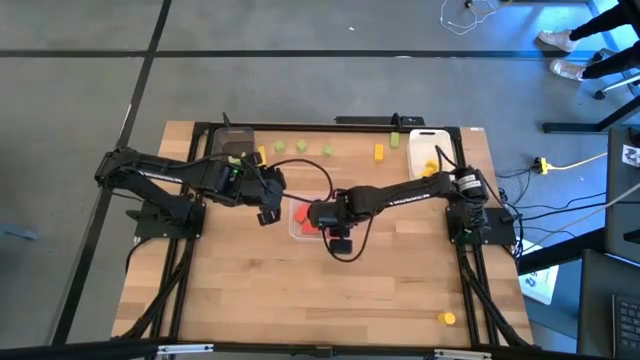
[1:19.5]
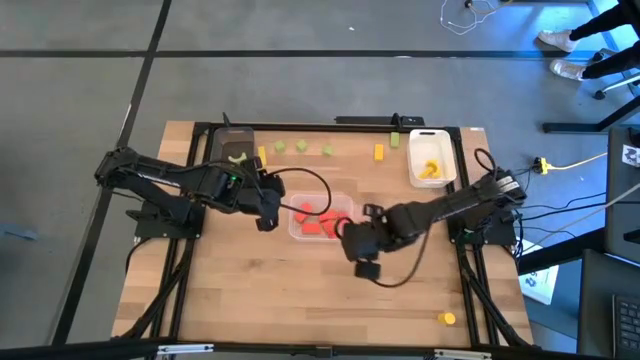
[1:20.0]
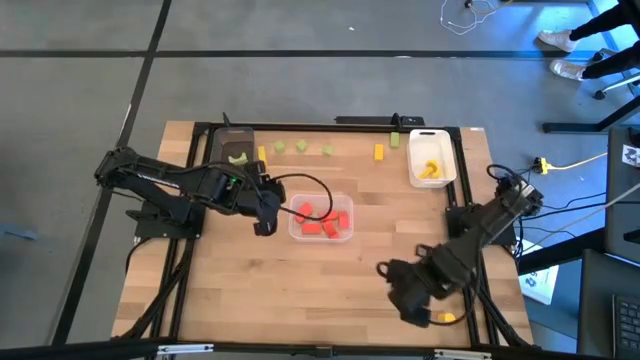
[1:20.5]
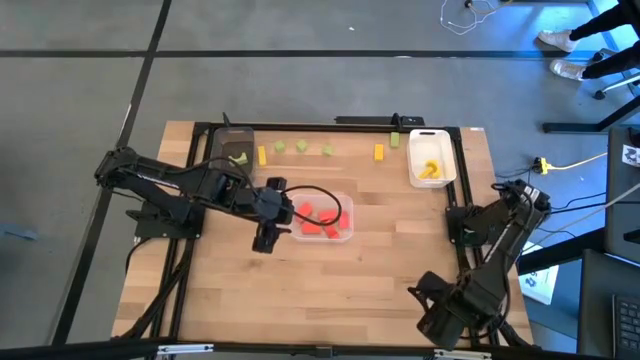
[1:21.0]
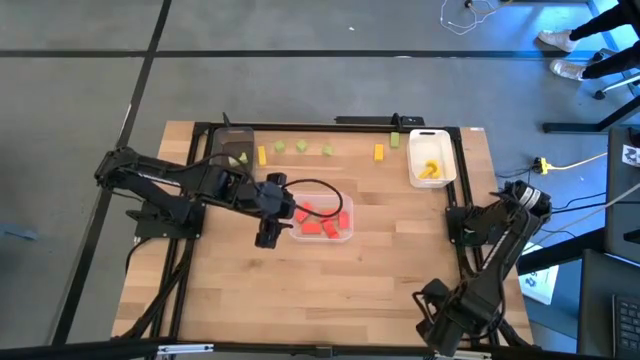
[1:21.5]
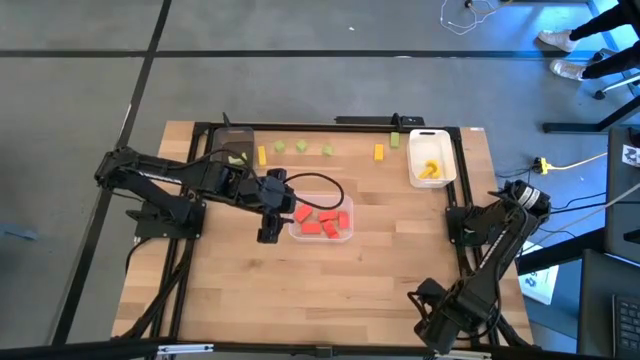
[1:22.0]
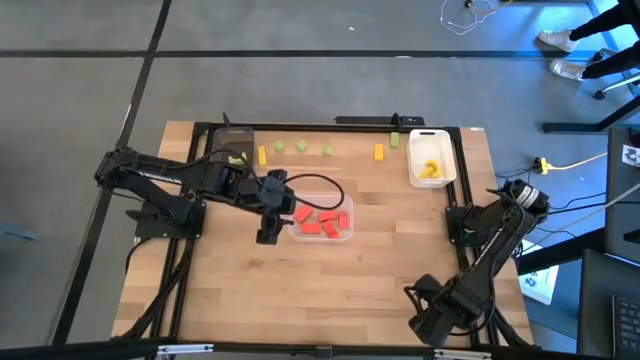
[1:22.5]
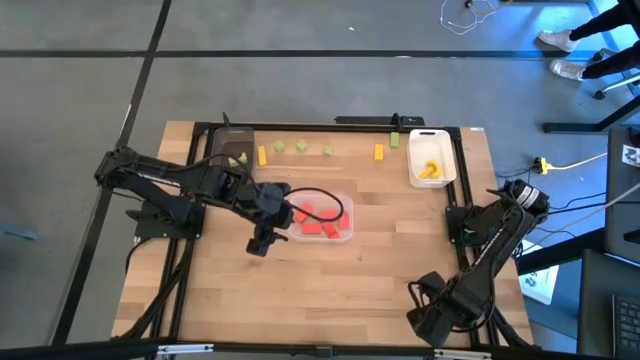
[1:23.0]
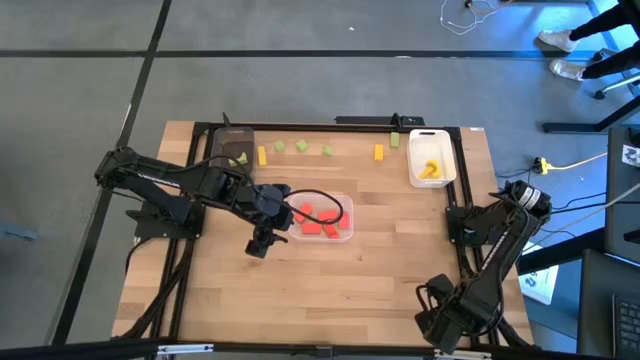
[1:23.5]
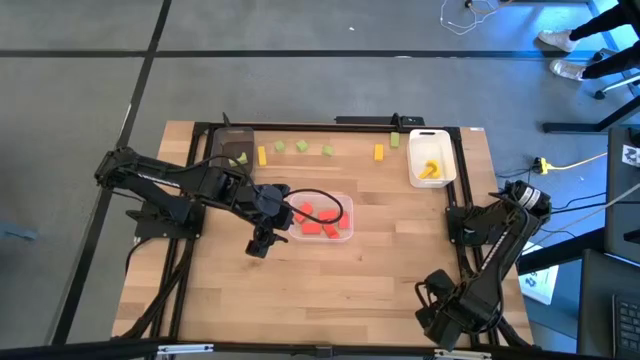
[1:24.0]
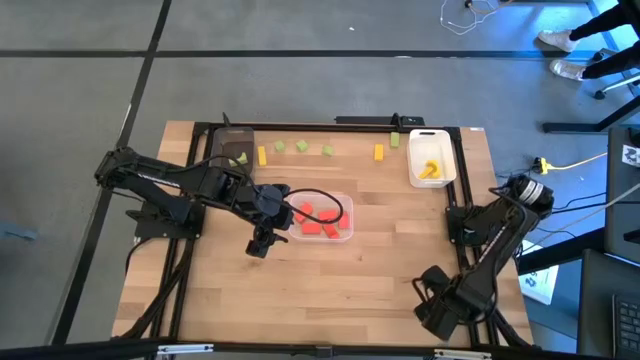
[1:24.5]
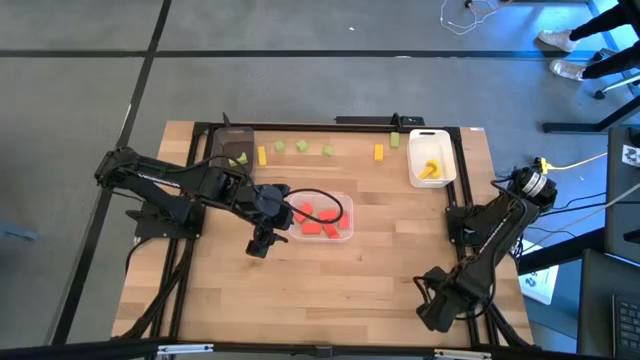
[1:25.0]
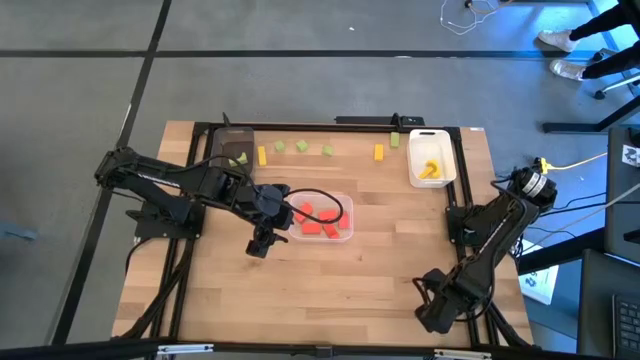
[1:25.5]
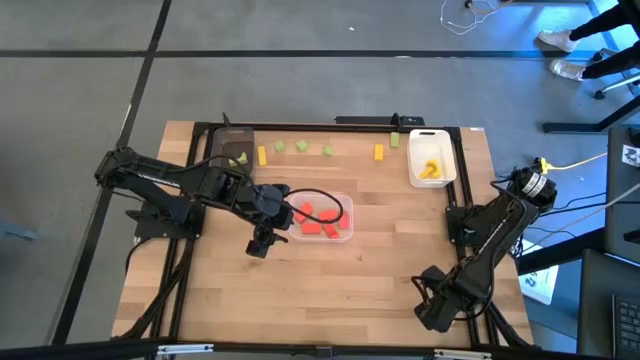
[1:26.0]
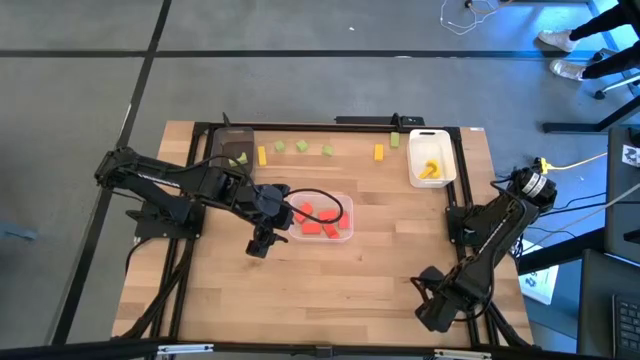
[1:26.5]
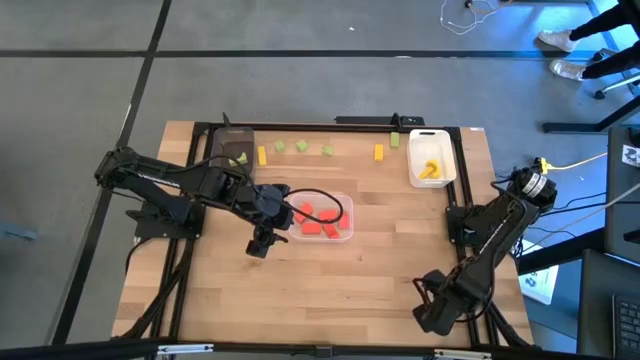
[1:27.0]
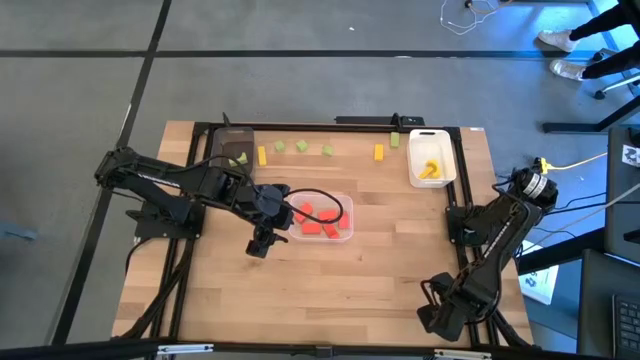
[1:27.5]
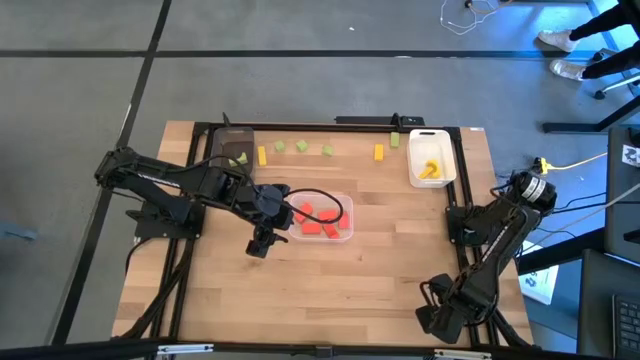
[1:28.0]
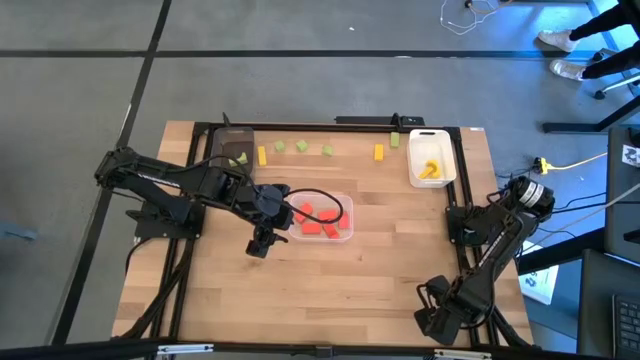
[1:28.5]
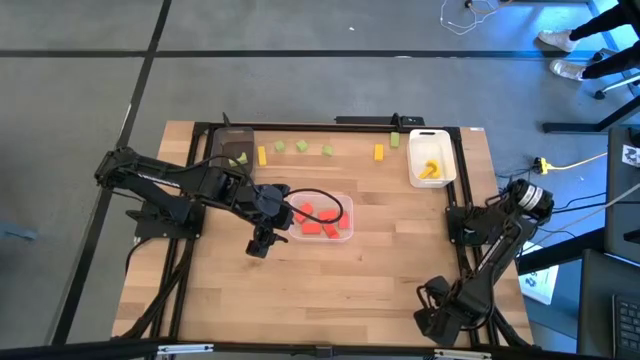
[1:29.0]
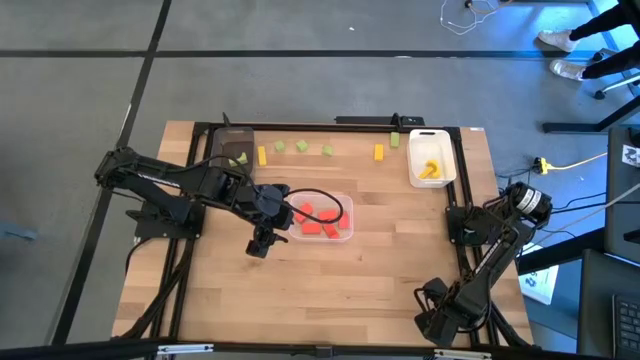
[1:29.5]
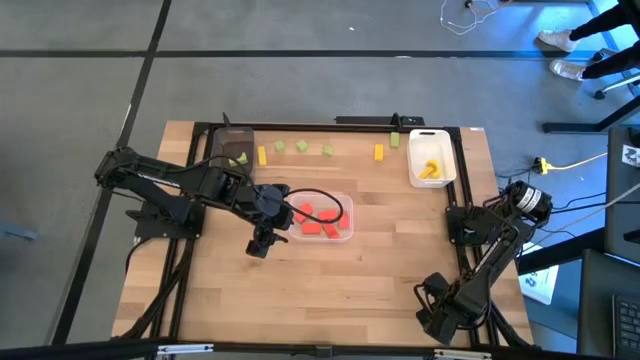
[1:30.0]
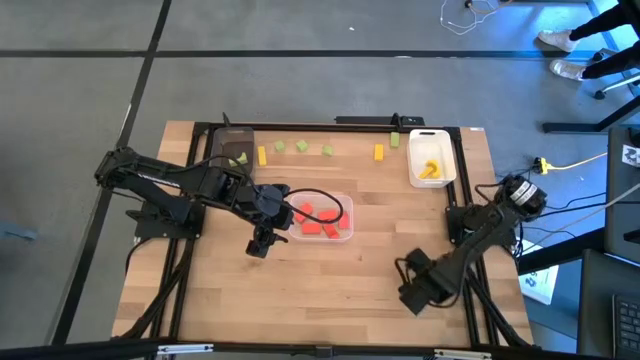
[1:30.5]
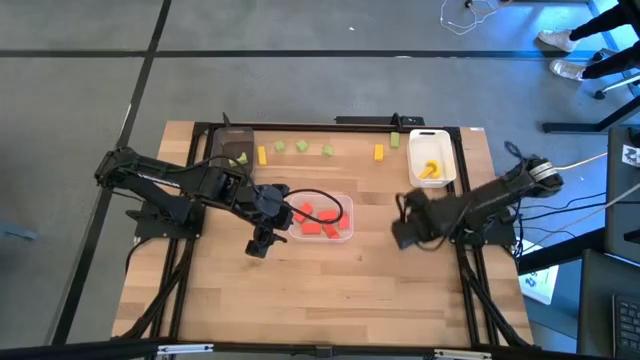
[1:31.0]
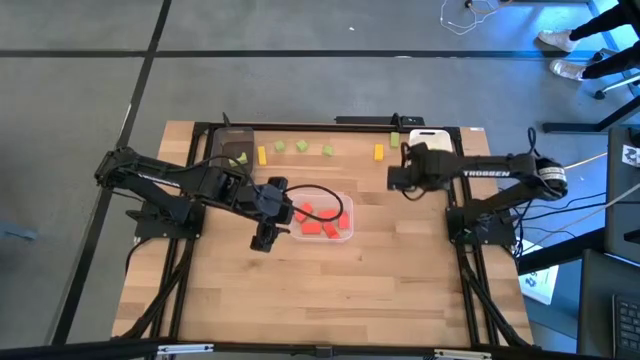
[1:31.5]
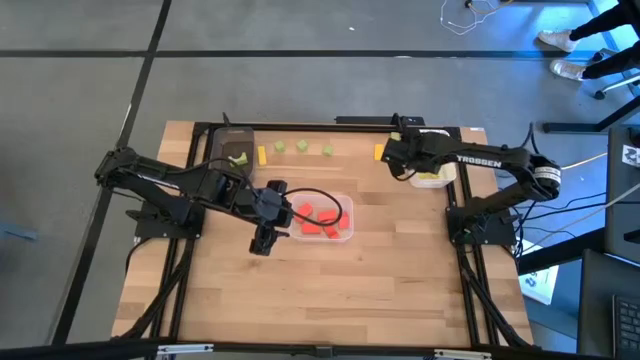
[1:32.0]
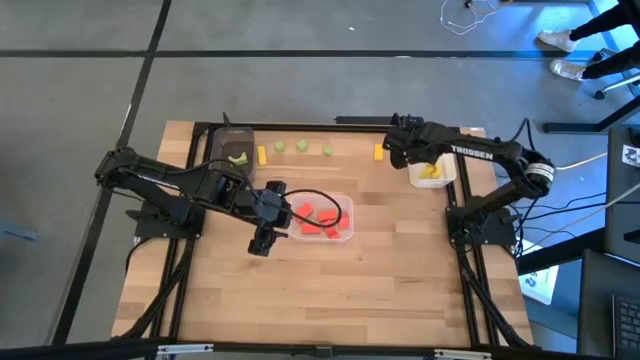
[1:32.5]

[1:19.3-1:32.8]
Task: Sort & place blocks by color
Put the yellow block into the white bin

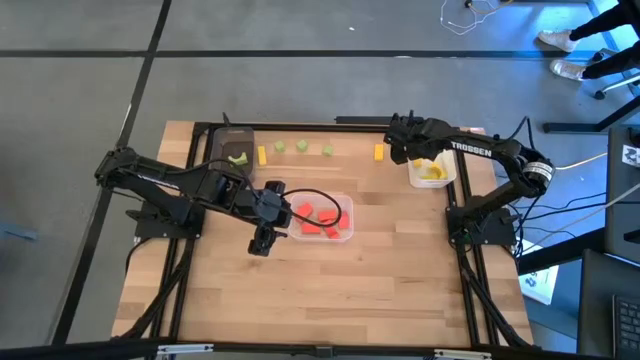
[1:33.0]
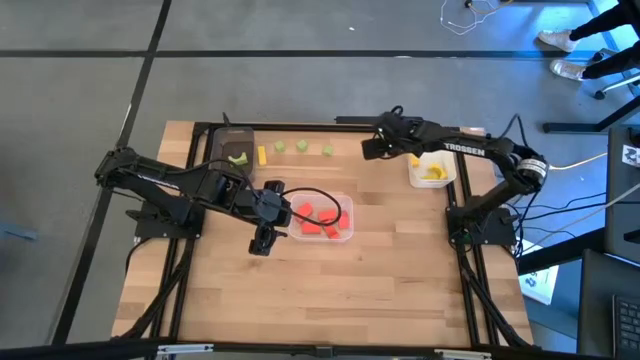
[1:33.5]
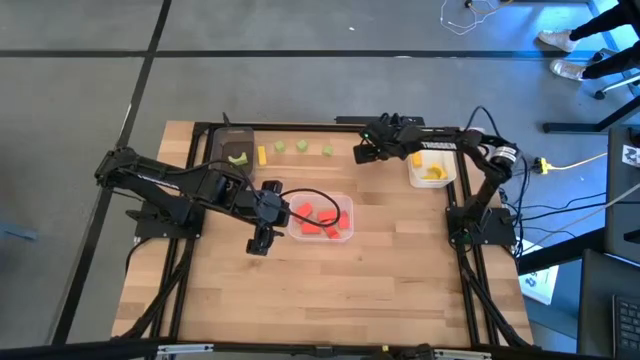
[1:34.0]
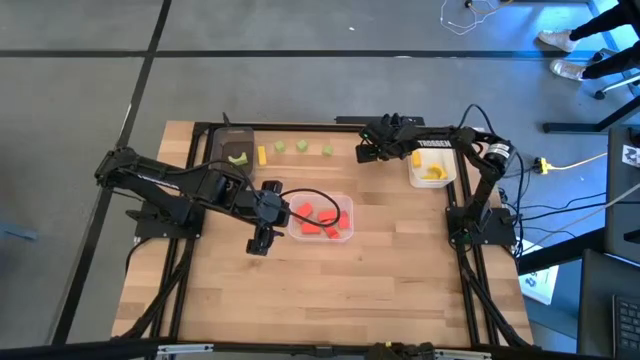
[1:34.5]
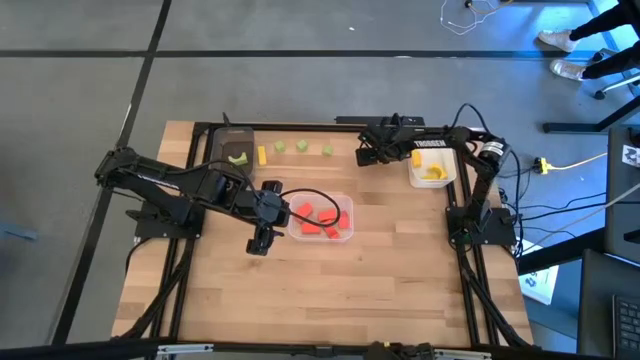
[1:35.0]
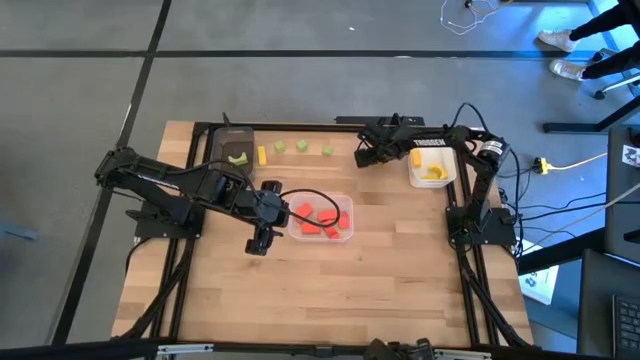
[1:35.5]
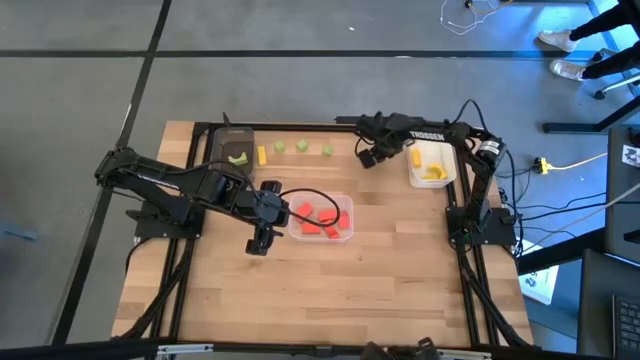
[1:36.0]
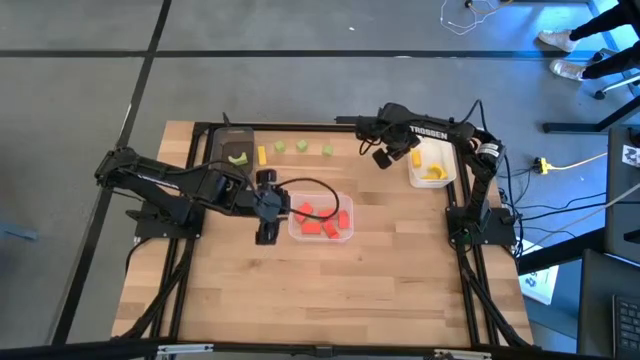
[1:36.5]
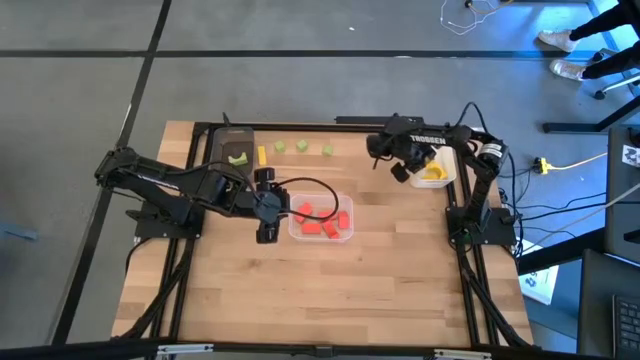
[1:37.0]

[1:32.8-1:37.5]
Put the yellow block into the white bin

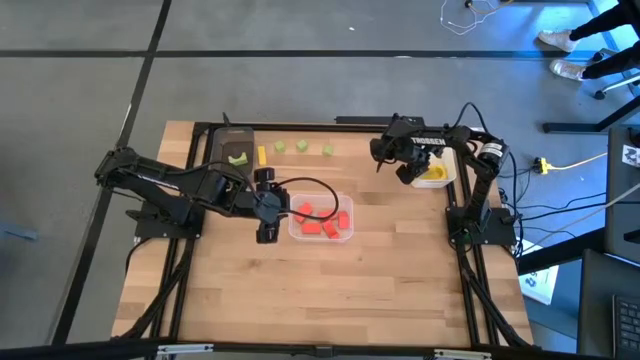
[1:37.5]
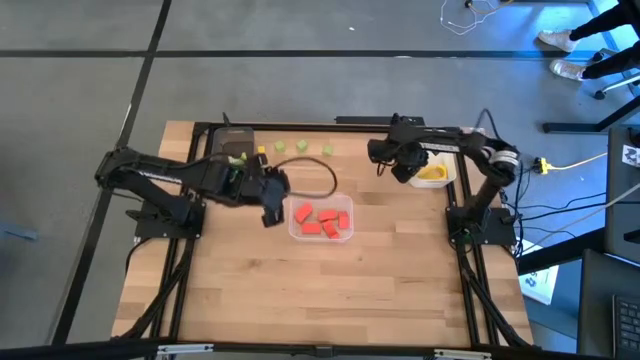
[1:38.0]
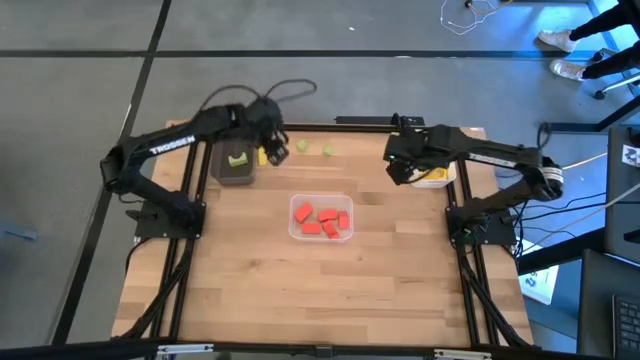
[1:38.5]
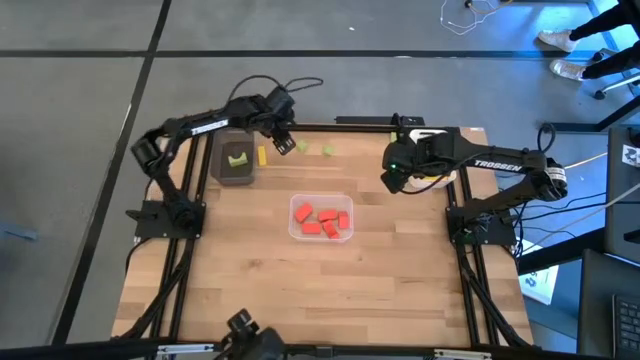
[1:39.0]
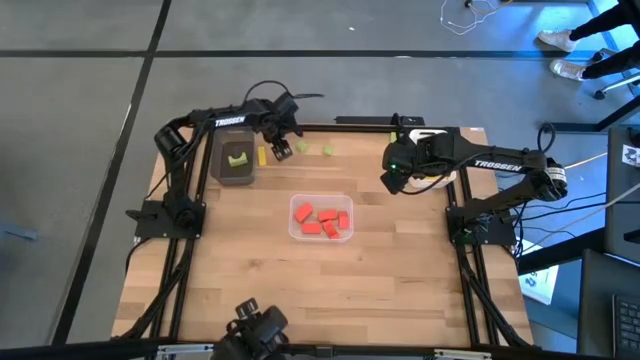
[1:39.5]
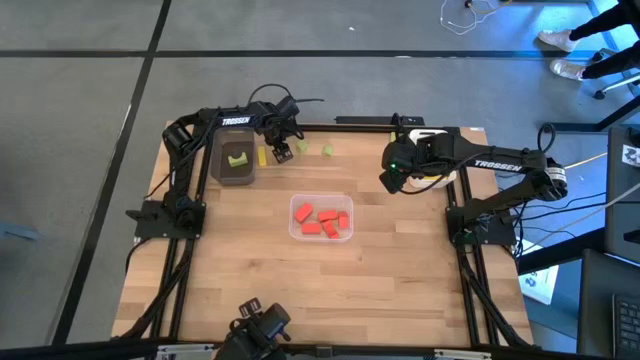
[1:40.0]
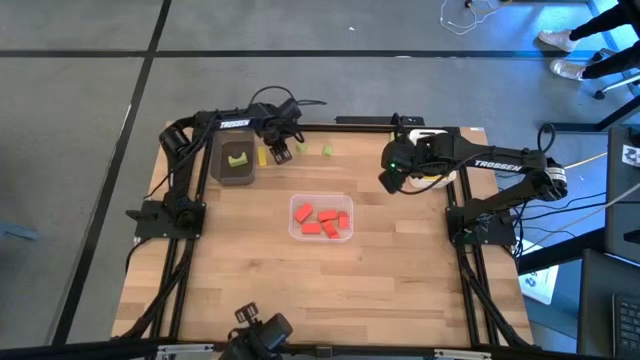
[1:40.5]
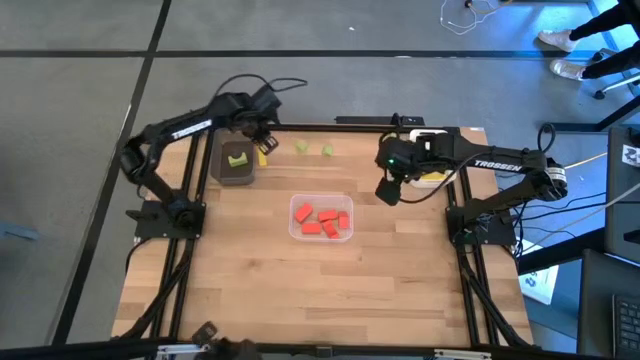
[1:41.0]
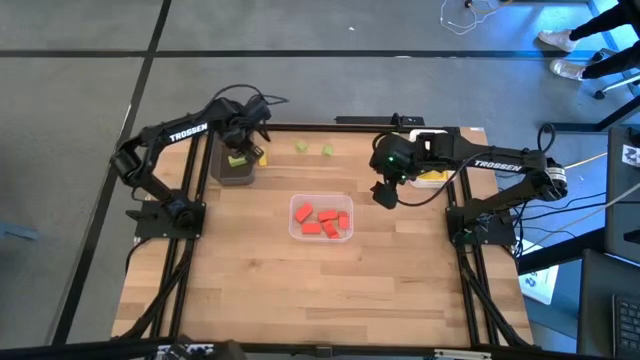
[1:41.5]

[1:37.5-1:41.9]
Put the green block into the black bin
